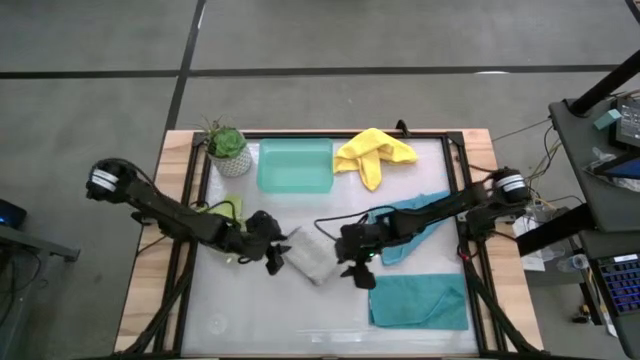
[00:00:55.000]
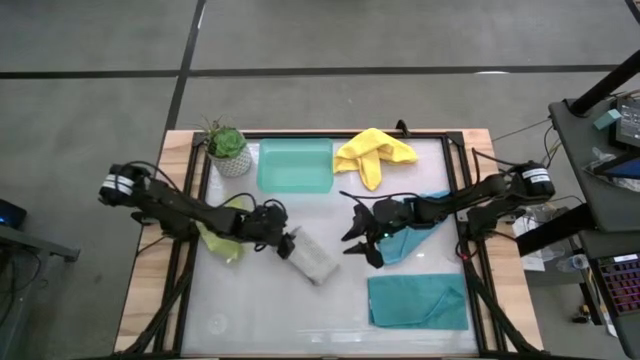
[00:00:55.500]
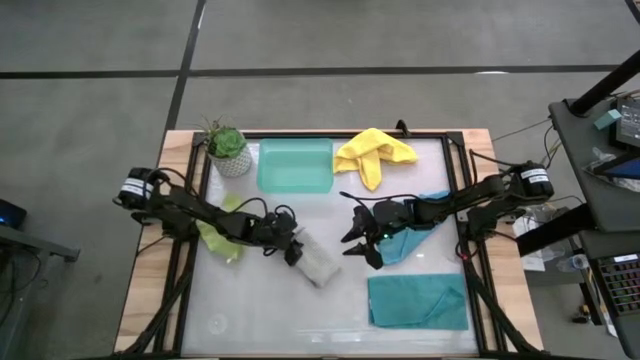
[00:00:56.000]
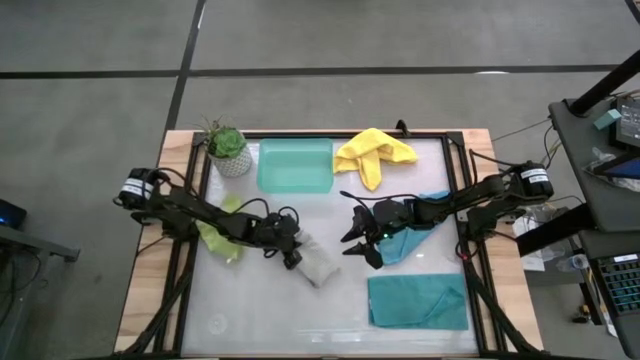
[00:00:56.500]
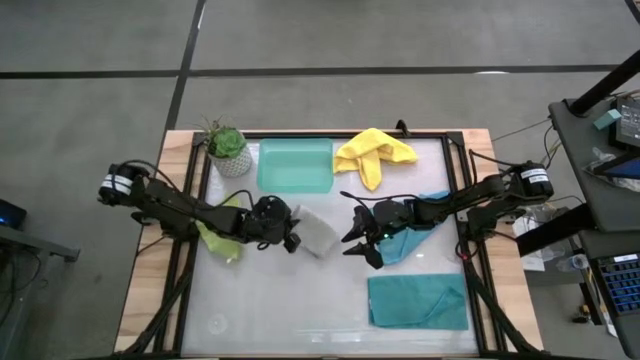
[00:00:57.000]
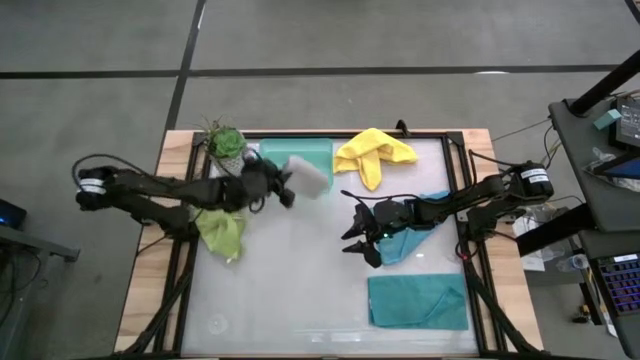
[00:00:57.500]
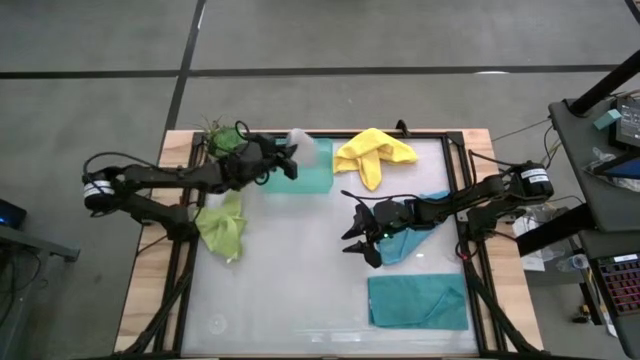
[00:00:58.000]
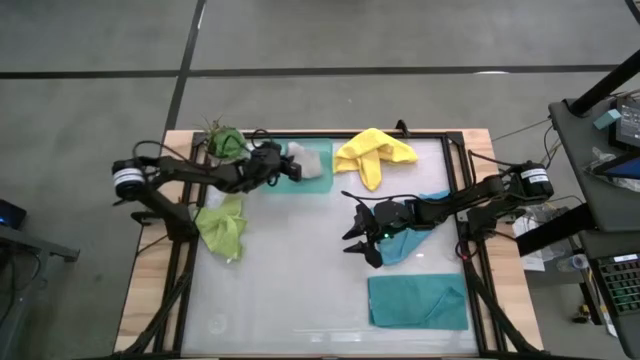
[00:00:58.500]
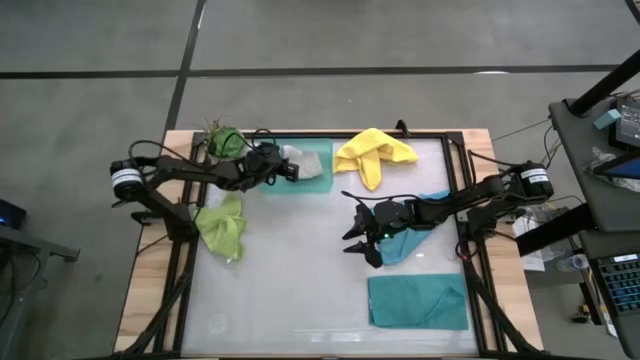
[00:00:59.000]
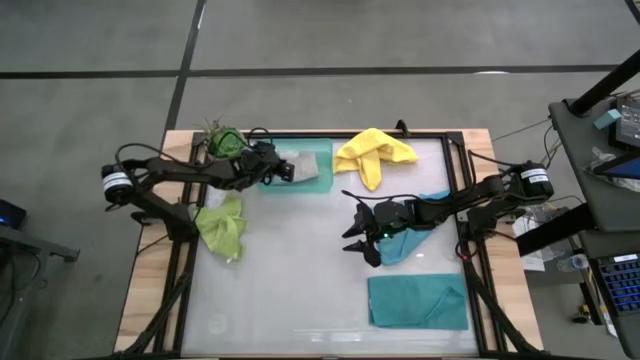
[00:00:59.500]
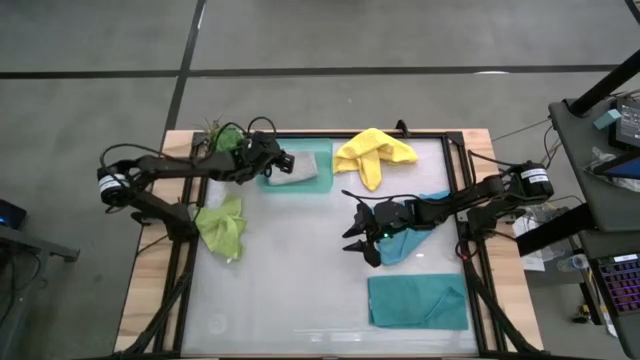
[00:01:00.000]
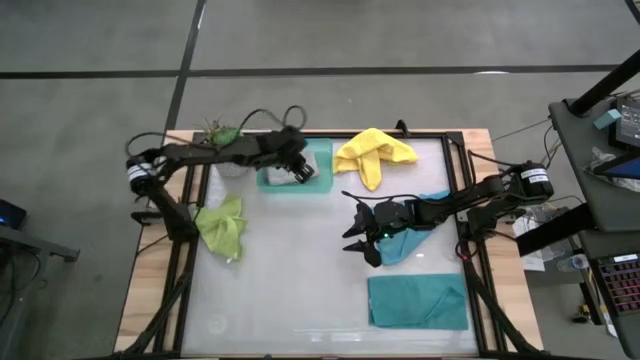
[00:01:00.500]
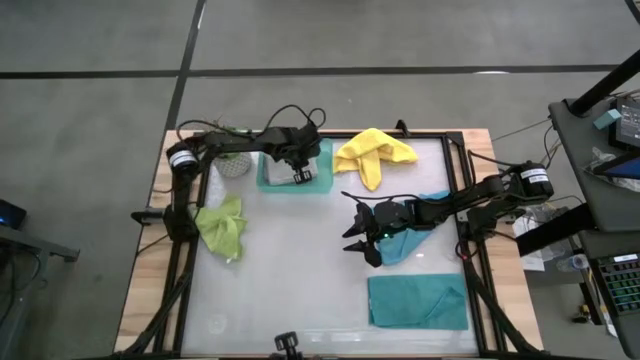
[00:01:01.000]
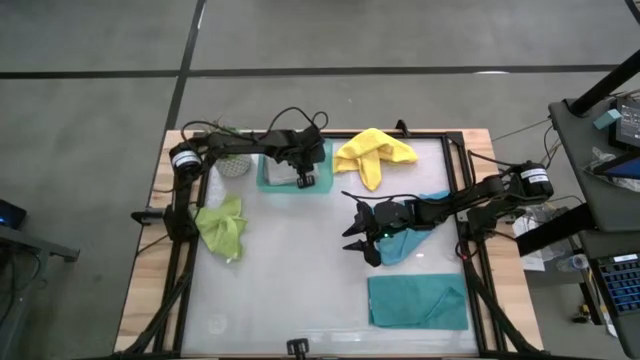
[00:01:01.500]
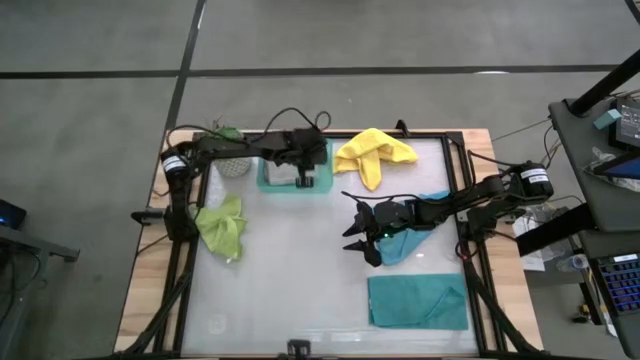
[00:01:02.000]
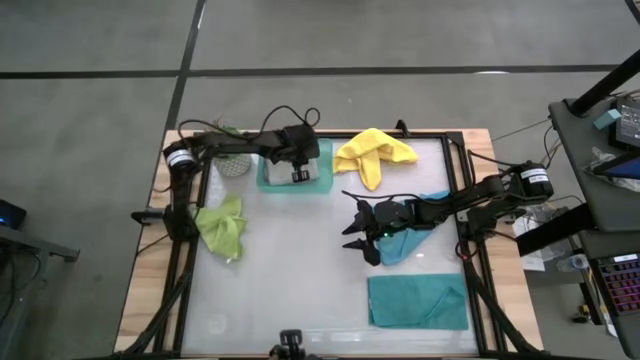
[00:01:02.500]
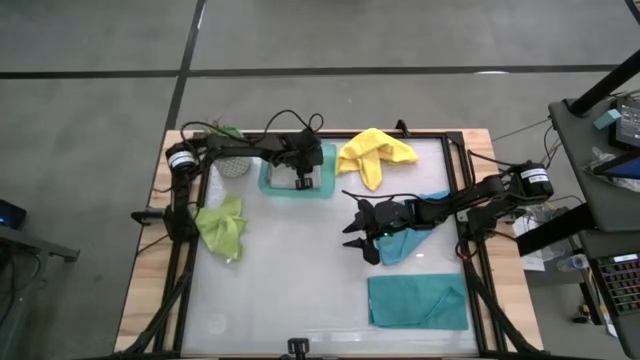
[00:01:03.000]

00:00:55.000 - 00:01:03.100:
Task: Fold microfiber towels
Put the gray microfiber towel into the bin

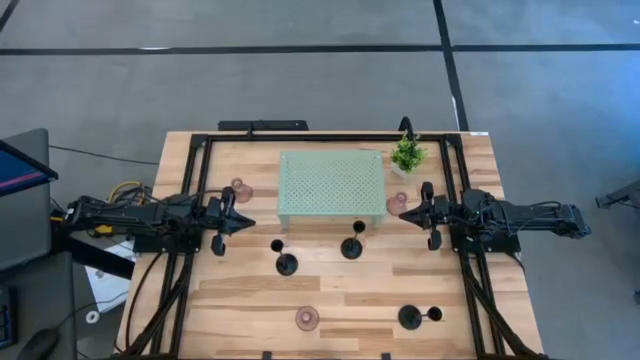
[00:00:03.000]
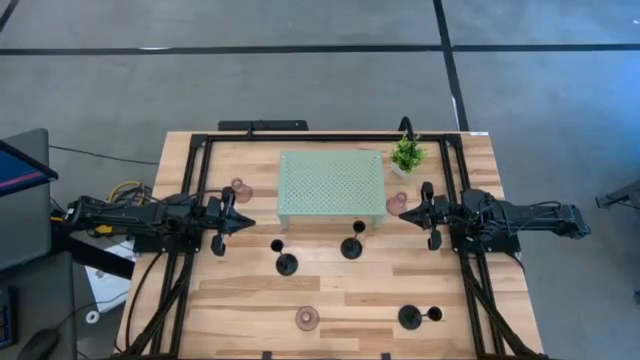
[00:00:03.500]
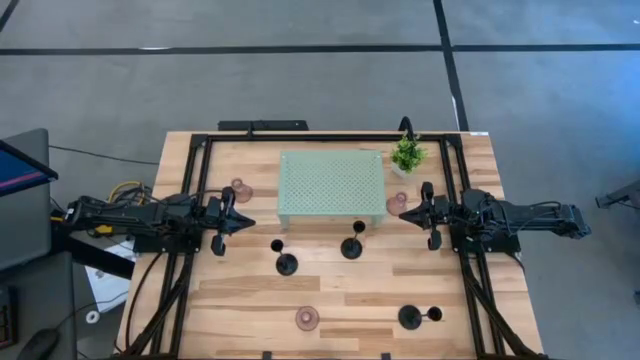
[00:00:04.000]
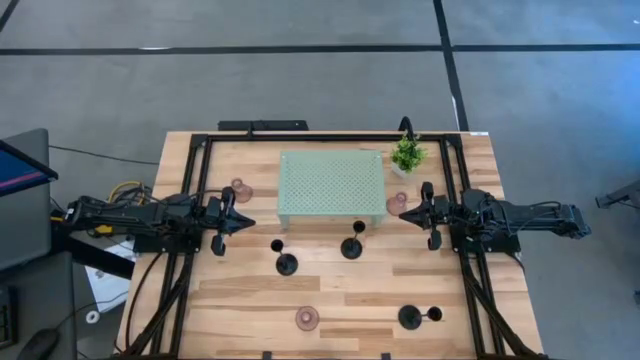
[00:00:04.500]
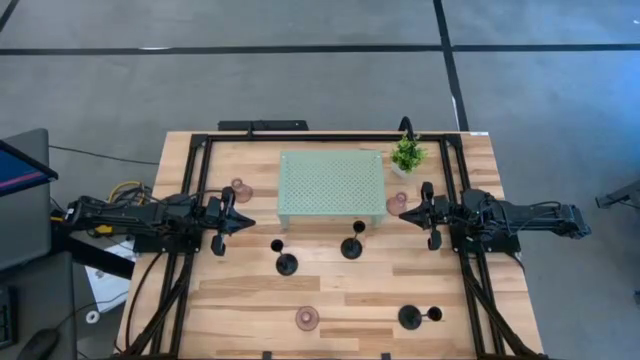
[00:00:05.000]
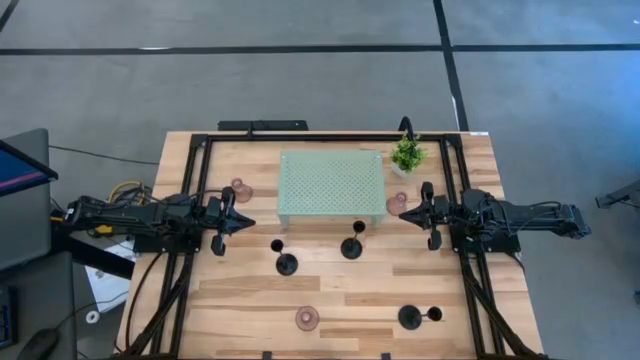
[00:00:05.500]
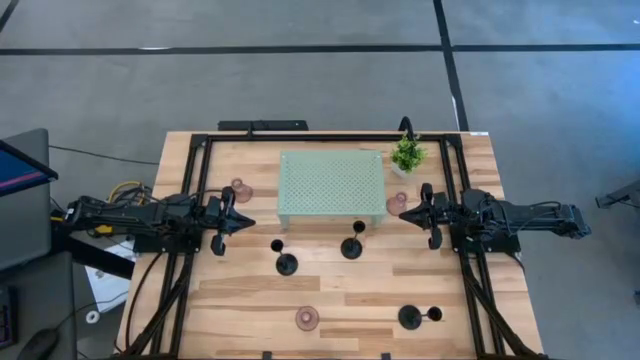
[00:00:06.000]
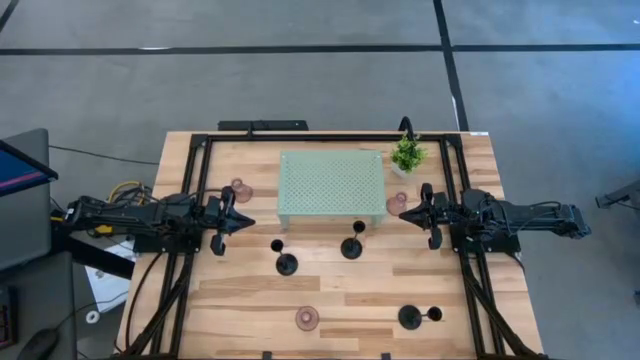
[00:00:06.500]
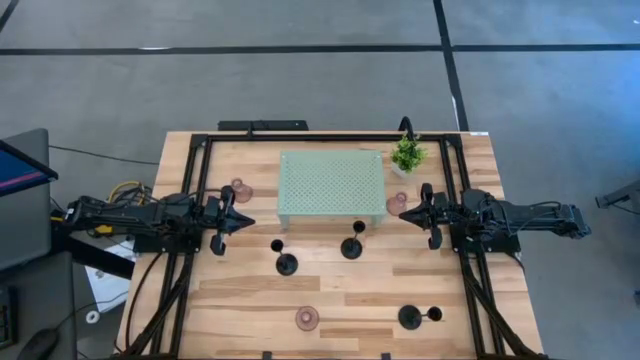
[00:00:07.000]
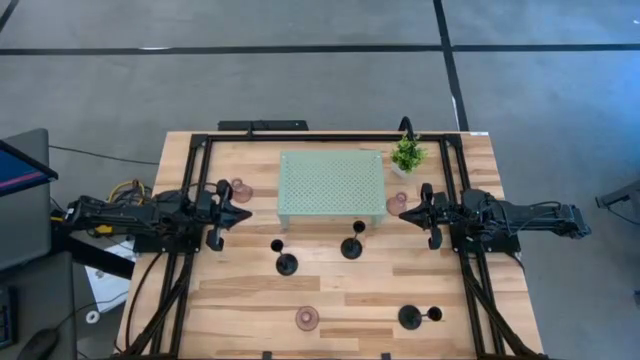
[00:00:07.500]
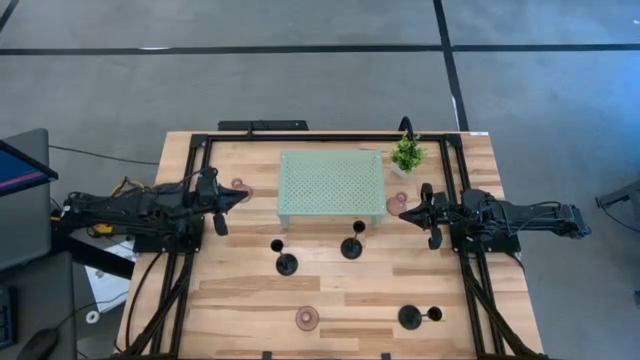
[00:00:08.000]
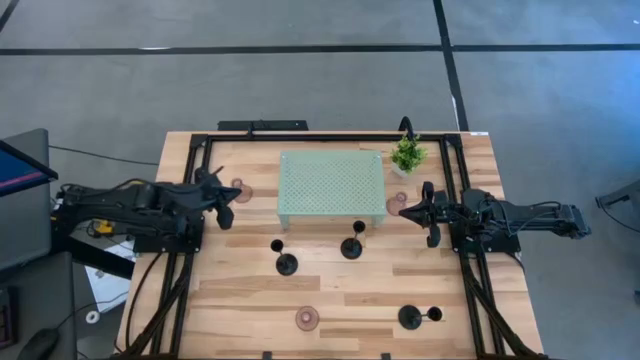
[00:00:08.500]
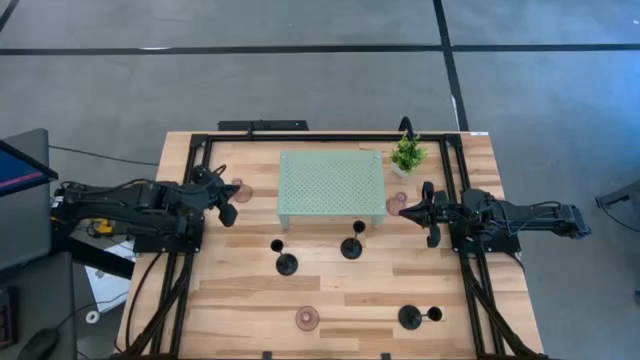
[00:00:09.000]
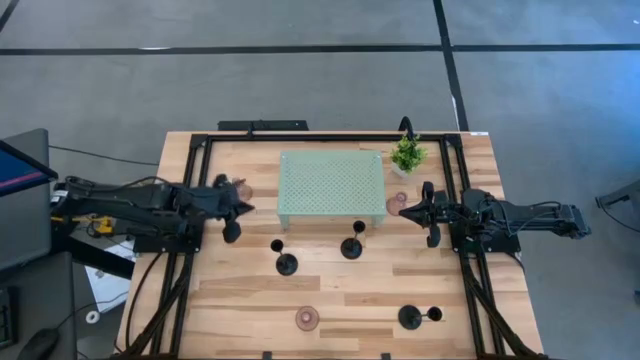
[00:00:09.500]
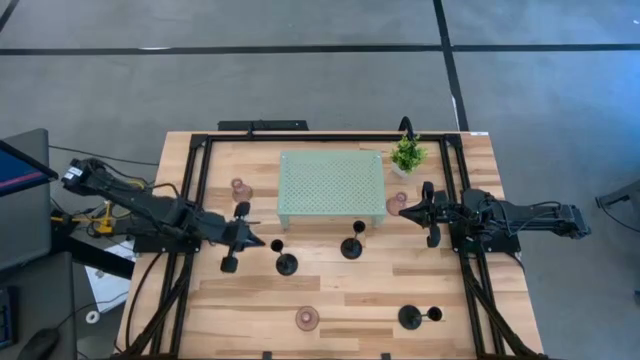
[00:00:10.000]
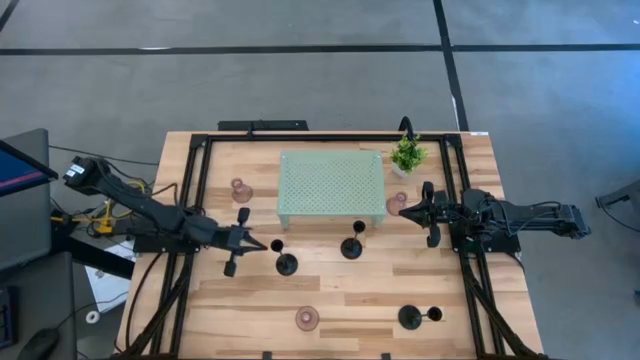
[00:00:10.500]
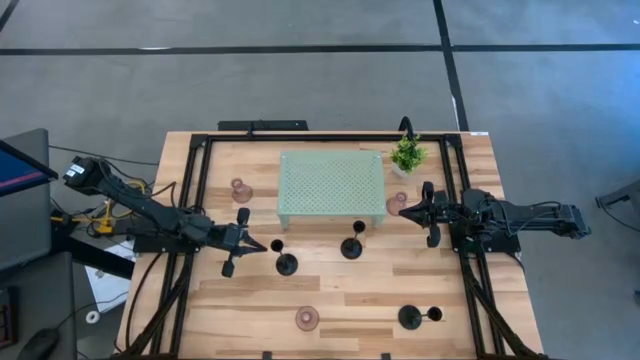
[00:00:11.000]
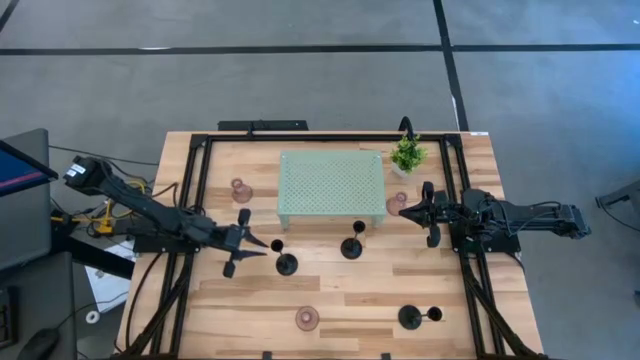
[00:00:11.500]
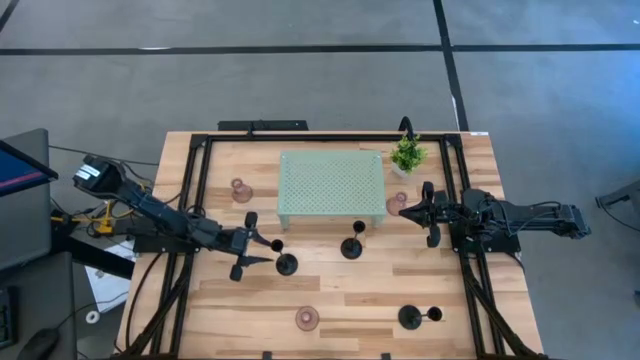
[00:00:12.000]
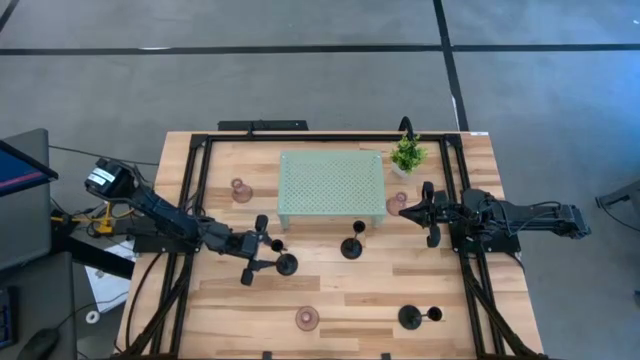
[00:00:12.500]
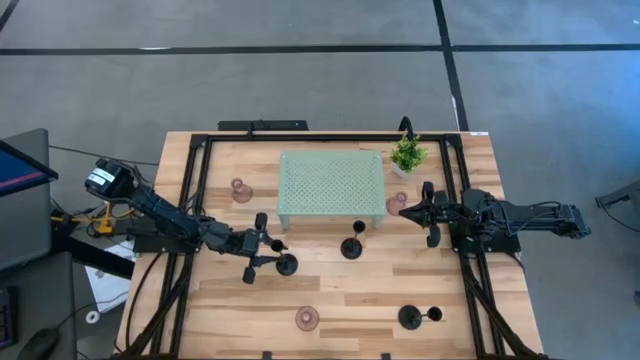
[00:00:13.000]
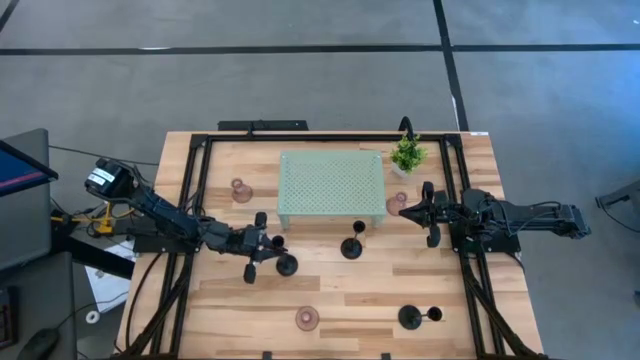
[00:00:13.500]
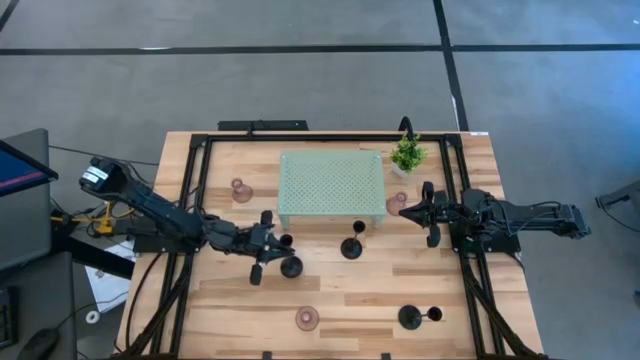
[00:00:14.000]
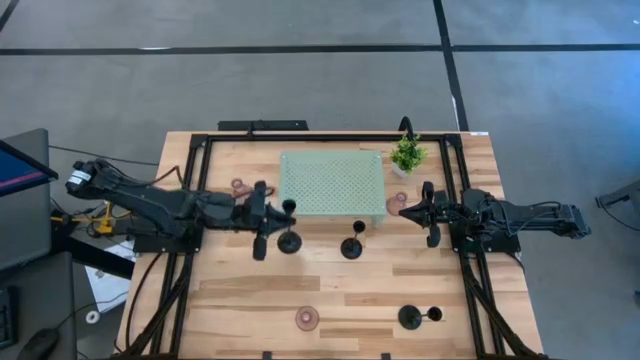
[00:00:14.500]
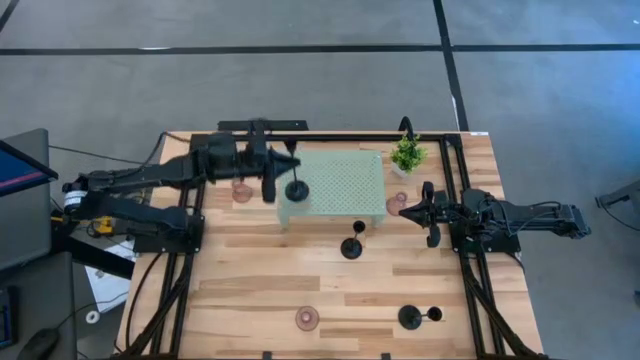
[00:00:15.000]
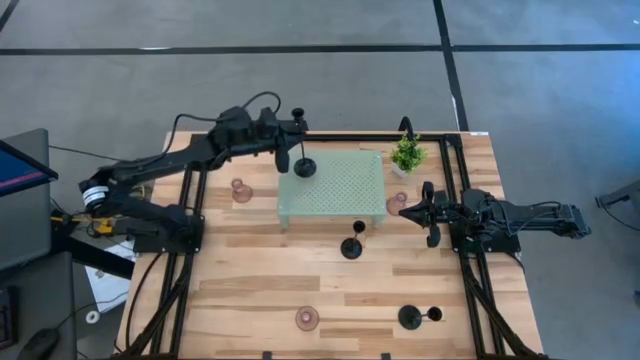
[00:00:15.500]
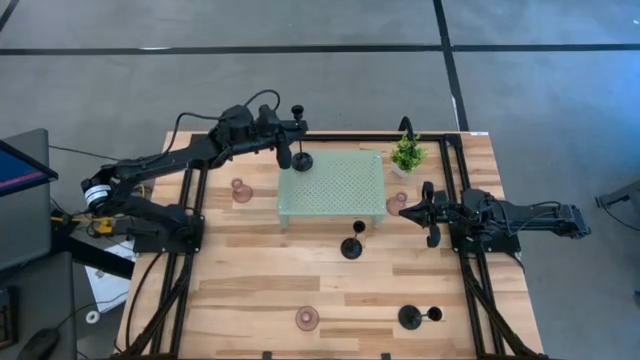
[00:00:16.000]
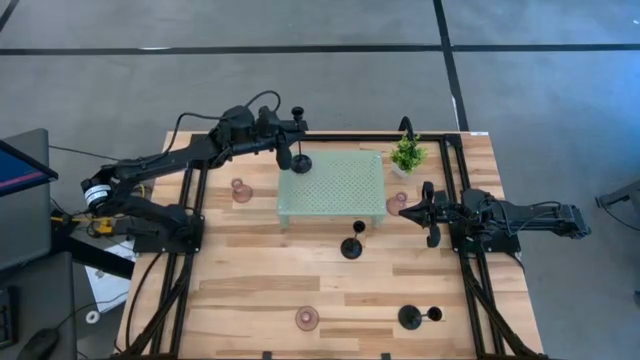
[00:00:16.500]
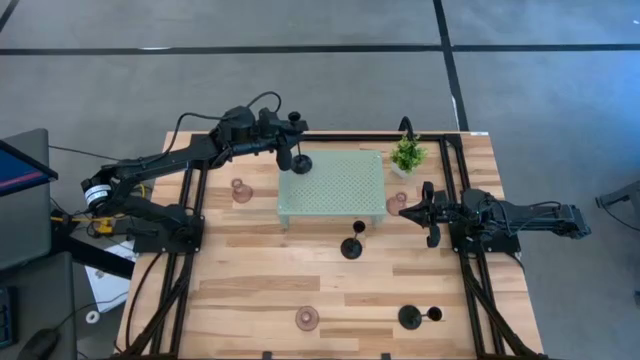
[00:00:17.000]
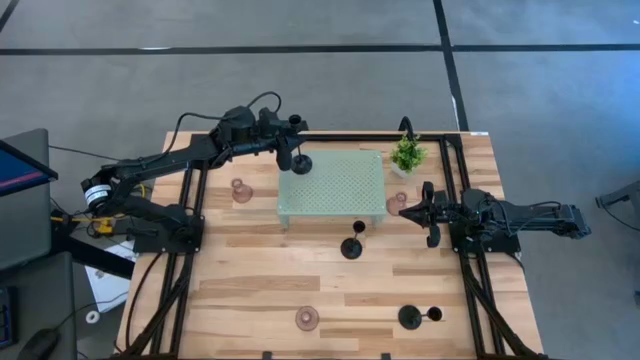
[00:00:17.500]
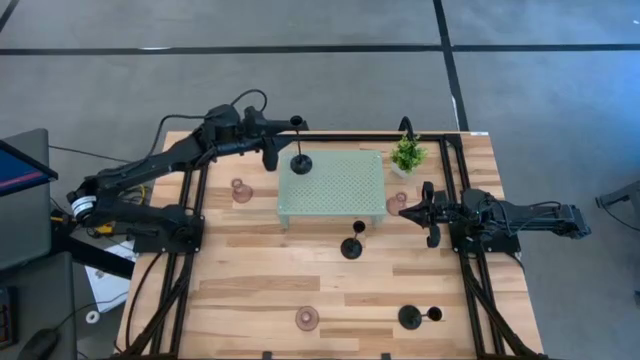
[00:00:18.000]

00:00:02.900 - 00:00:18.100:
Task: Pick & Place candle stick holders
Put the left black candle holder on the shelf
